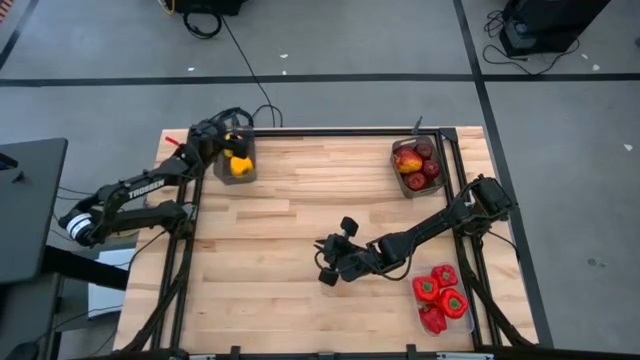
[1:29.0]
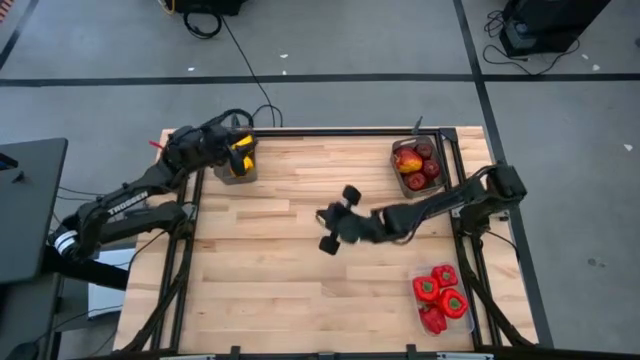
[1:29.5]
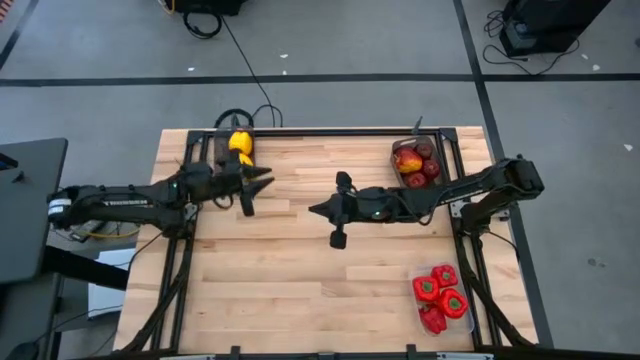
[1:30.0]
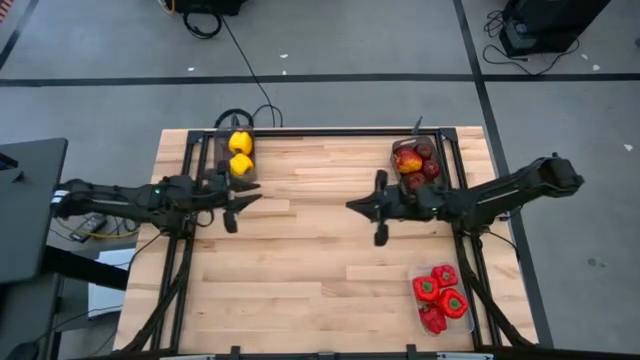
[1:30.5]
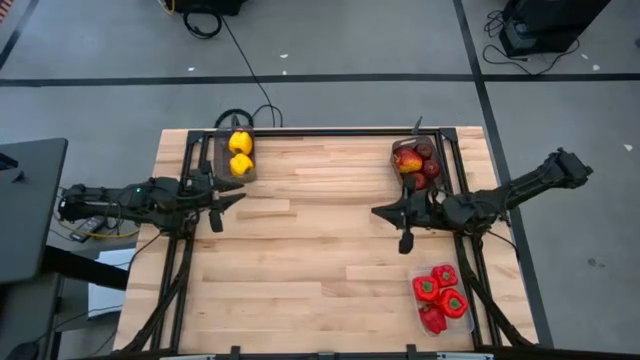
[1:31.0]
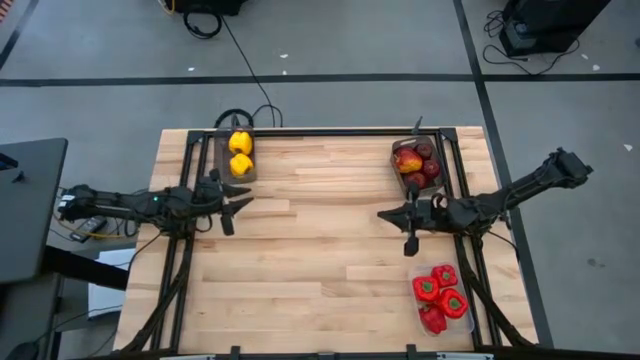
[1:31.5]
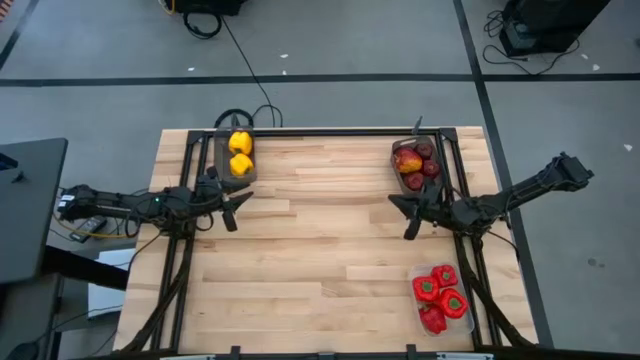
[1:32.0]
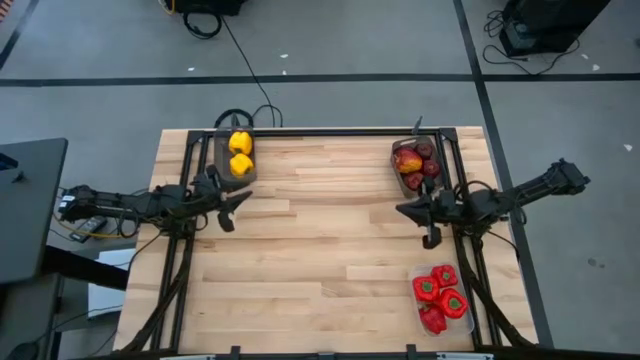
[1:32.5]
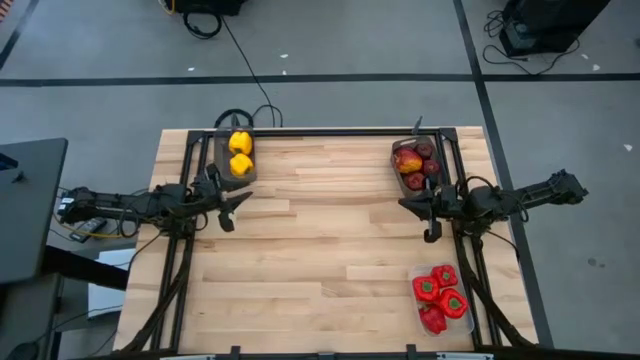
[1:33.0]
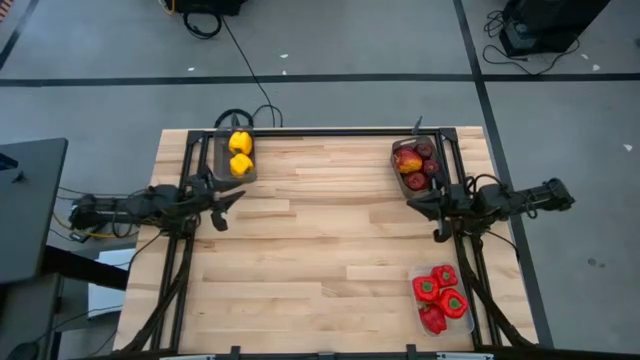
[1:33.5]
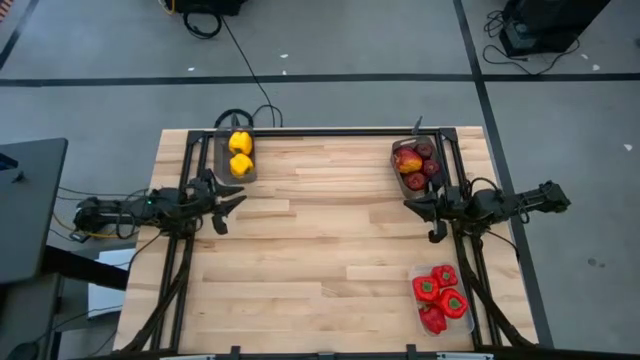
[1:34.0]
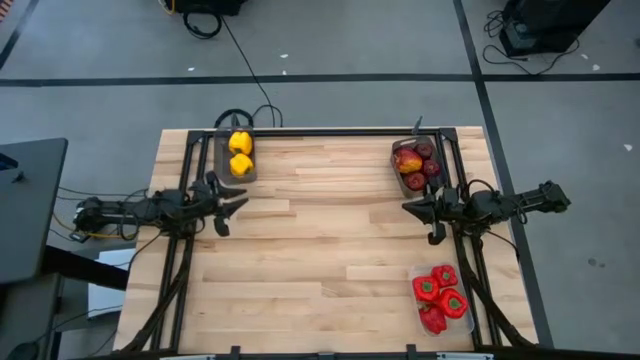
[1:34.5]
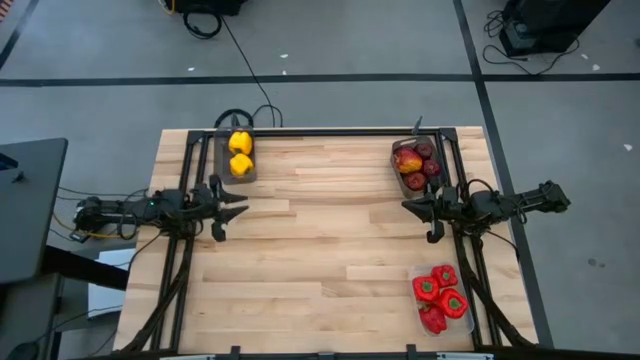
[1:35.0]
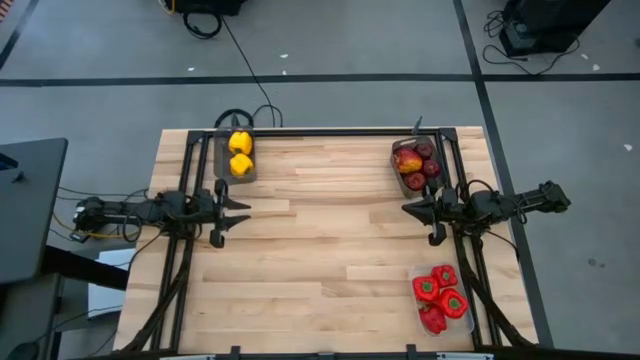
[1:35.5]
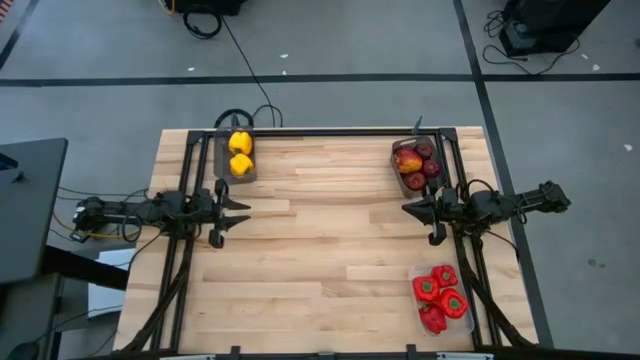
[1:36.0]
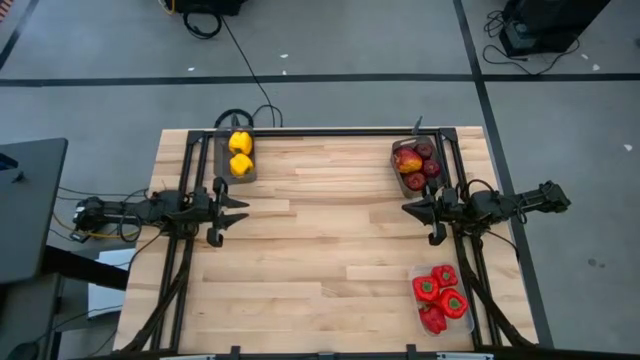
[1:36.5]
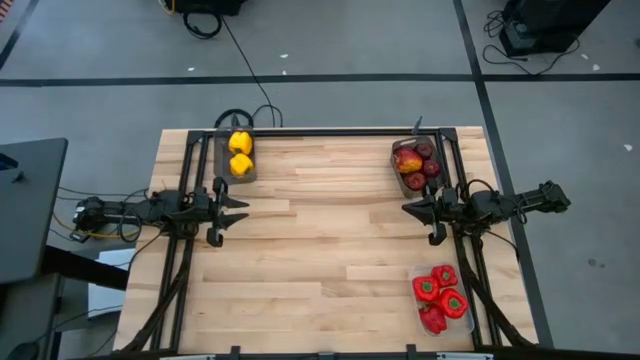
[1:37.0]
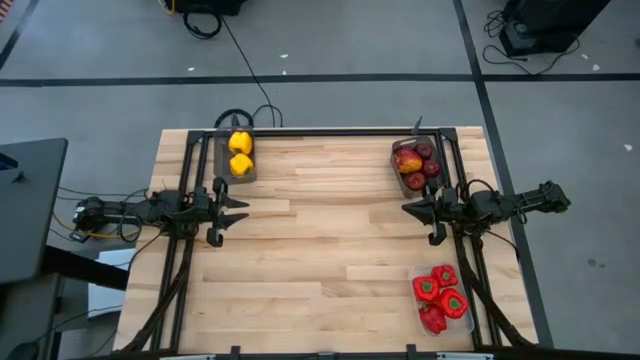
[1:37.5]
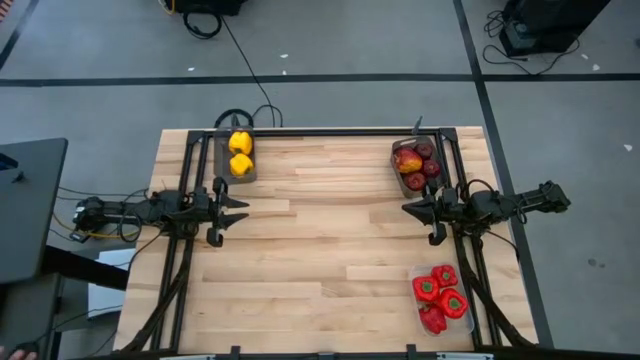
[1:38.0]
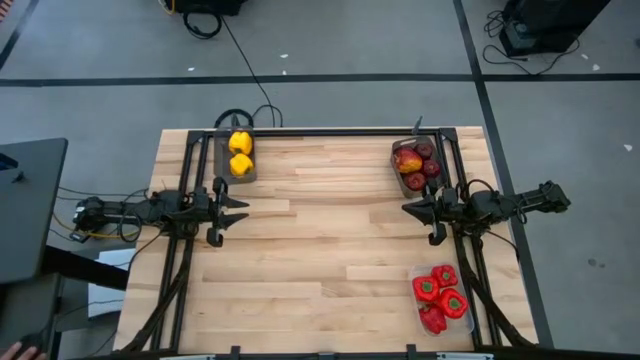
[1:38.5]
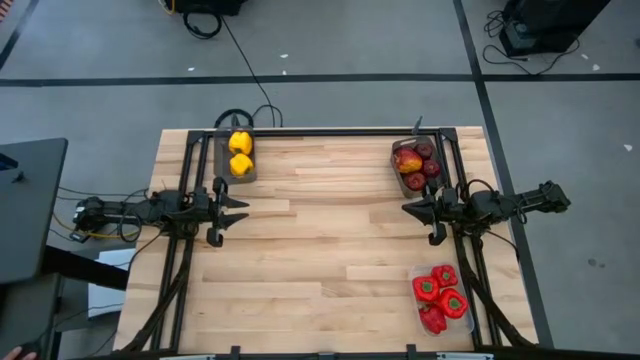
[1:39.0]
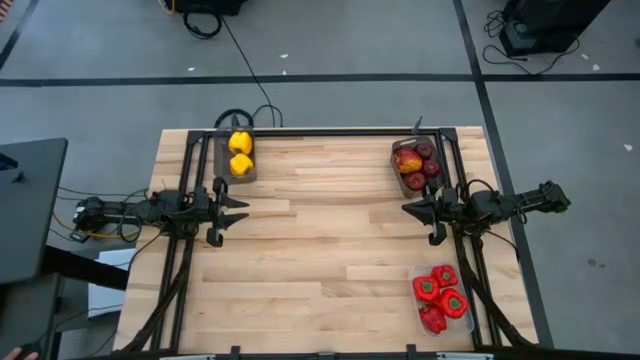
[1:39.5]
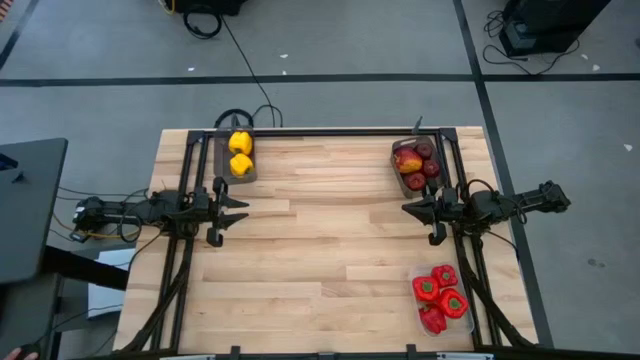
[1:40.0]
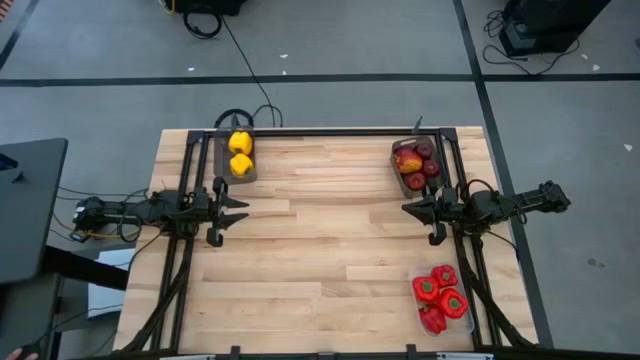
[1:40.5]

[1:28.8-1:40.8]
Task: Sort produce into baskets
Return to Home Position

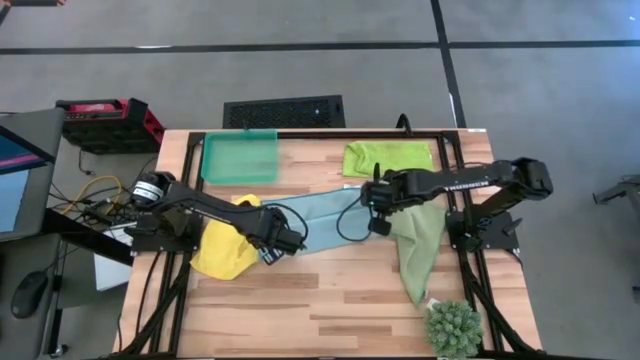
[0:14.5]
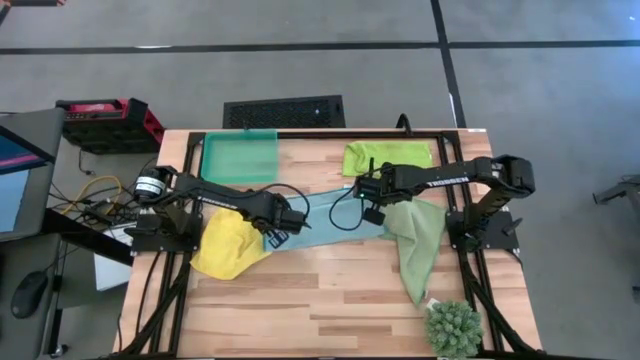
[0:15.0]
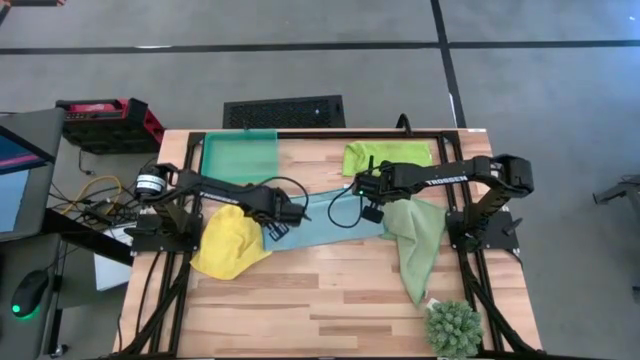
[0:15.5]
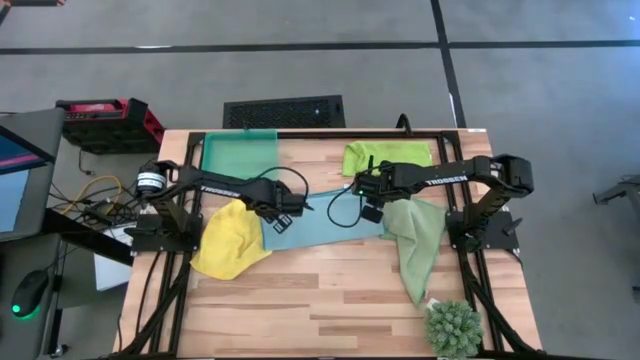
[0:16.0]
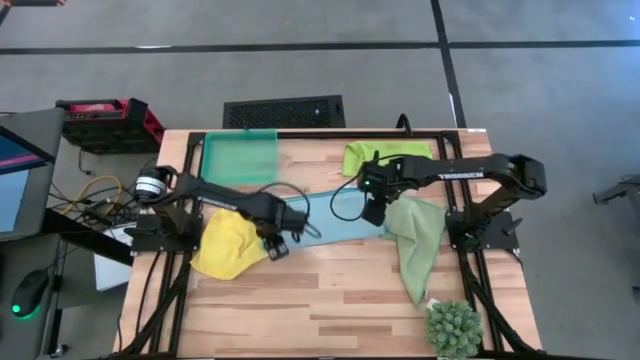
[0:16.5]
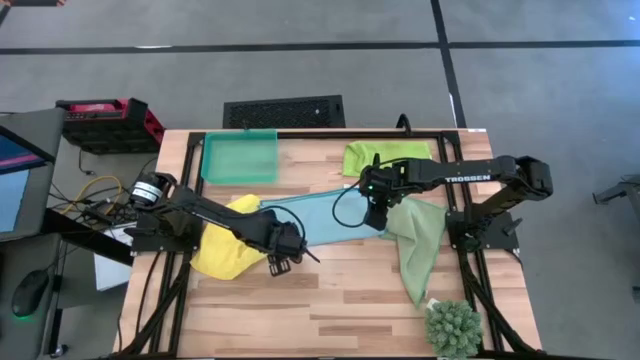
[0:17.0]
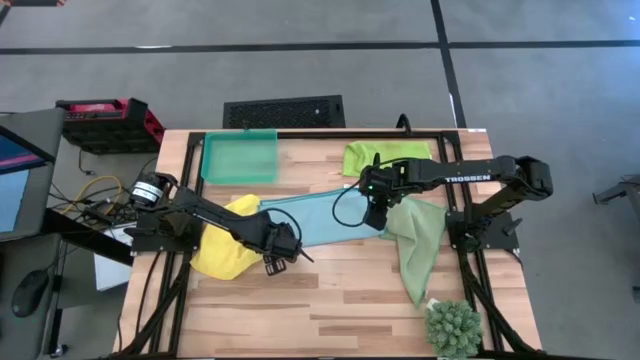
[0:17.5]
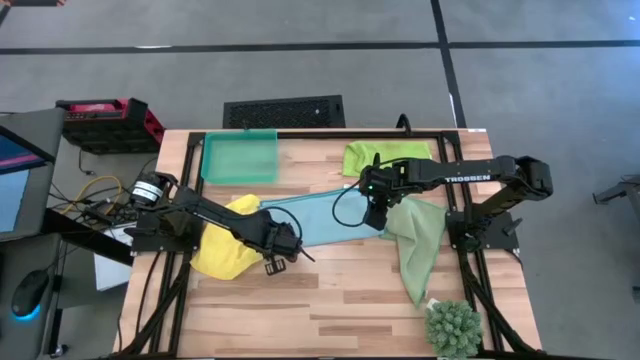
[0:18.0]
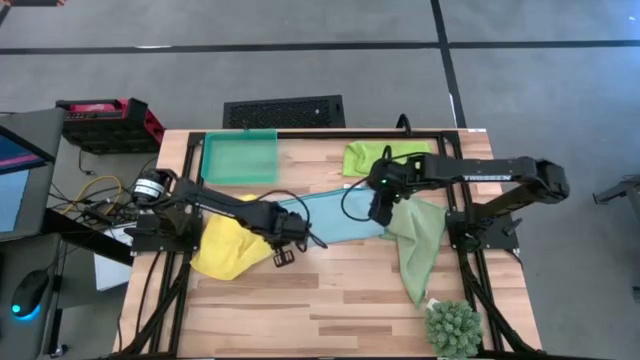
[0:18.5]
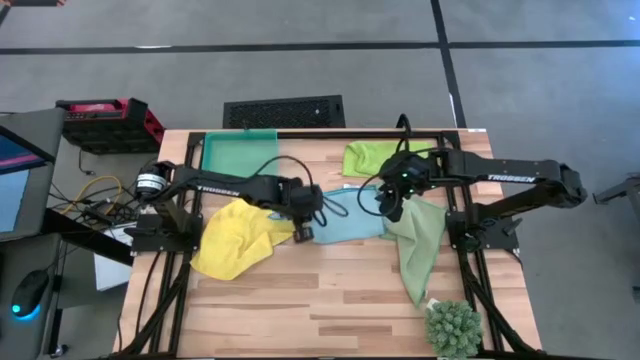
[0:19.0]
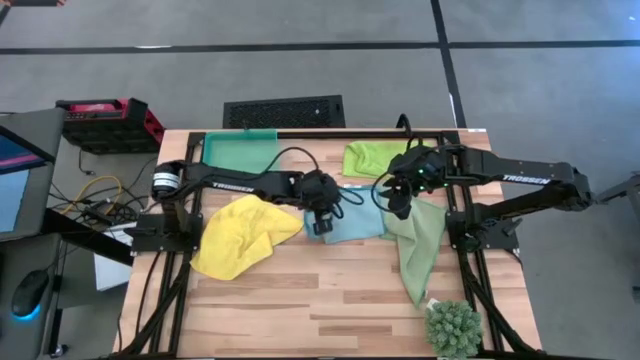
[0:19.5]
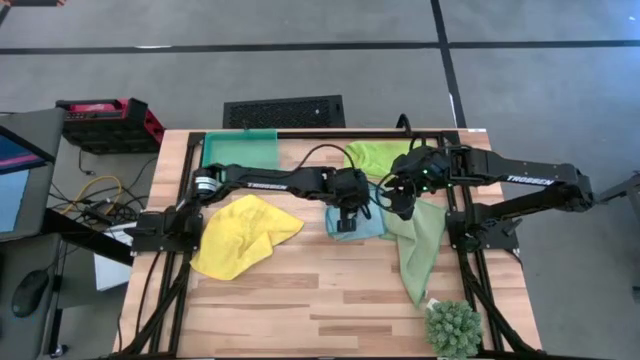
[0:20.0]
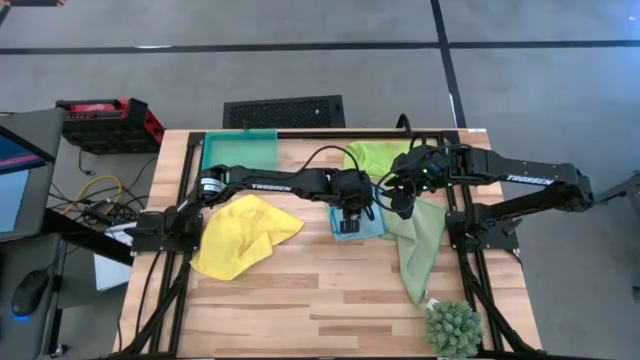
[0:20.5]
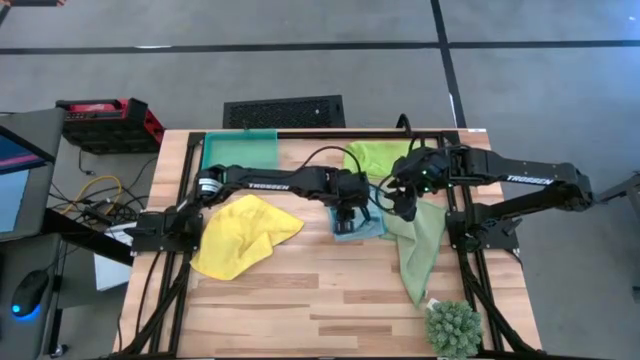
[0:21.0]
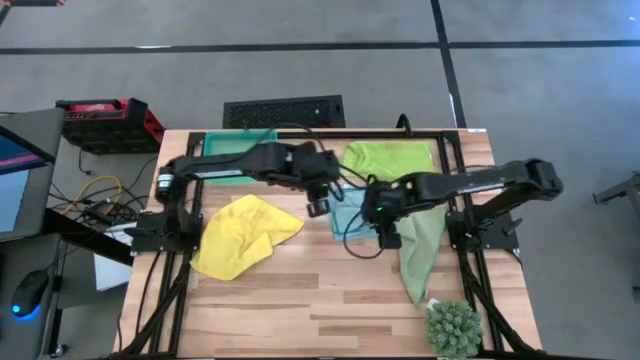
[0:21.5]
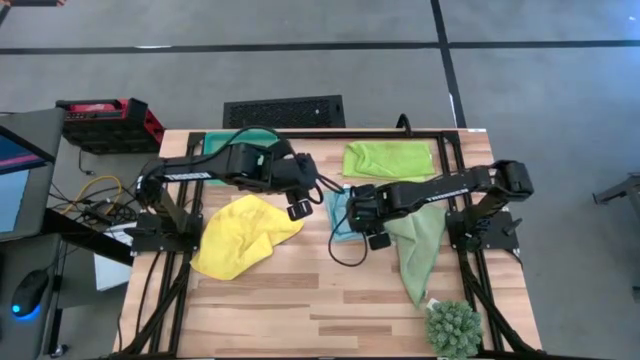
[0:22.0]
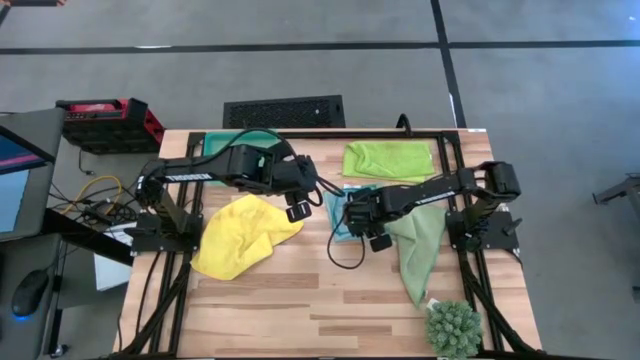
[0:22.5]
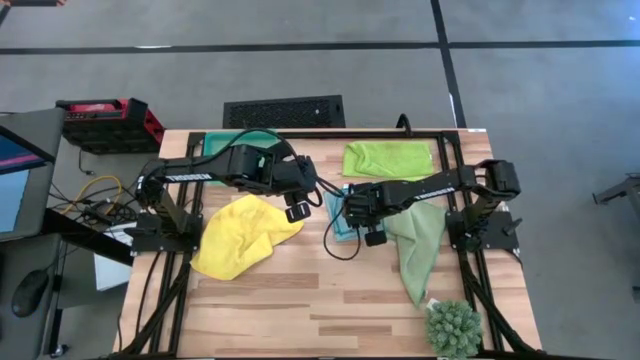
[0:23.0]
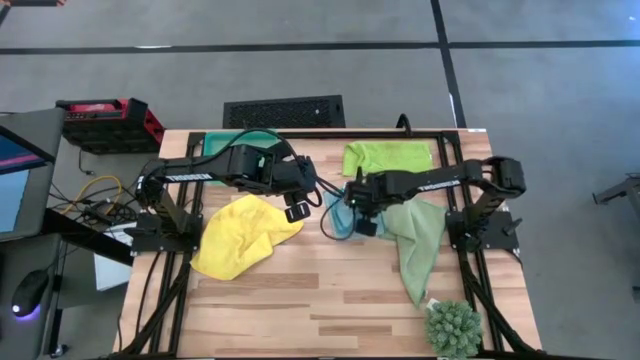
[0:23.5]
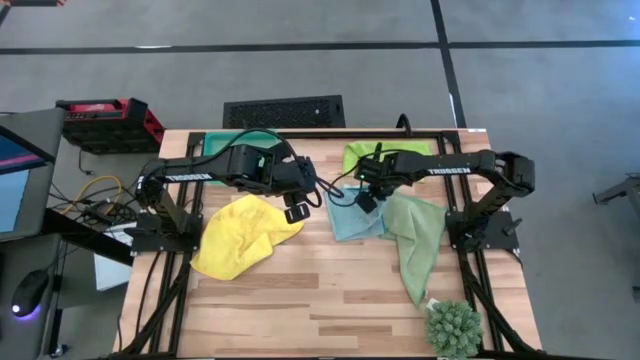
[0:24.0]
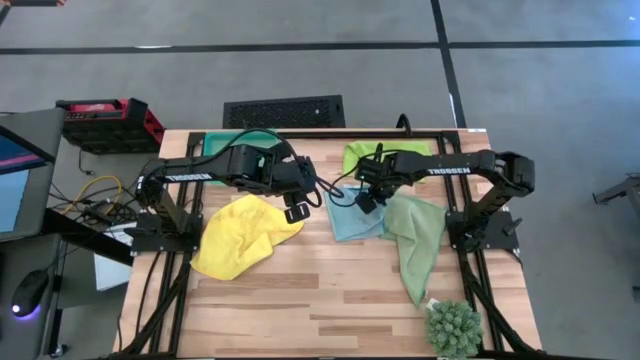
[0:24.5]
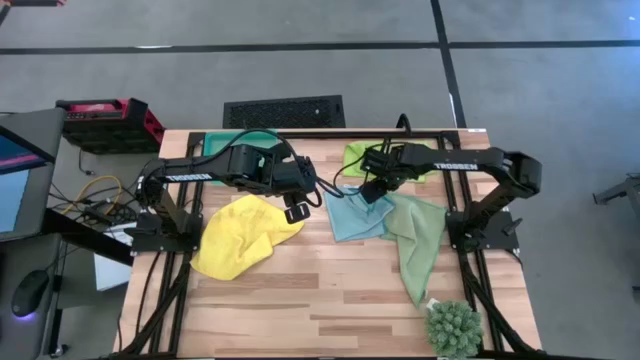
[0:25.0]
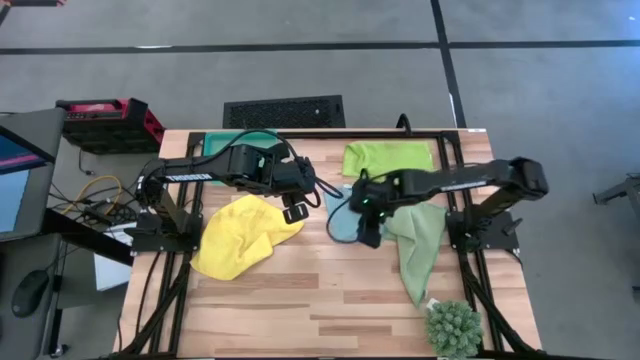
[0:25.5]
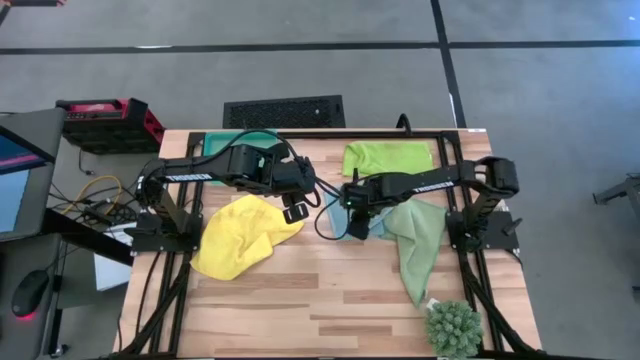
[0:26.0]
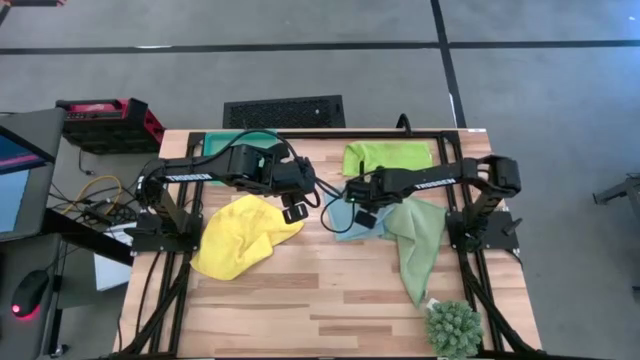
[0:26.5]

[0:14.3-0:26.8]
Task: Fold microfiber towels
Fold the blue microfiber towel
